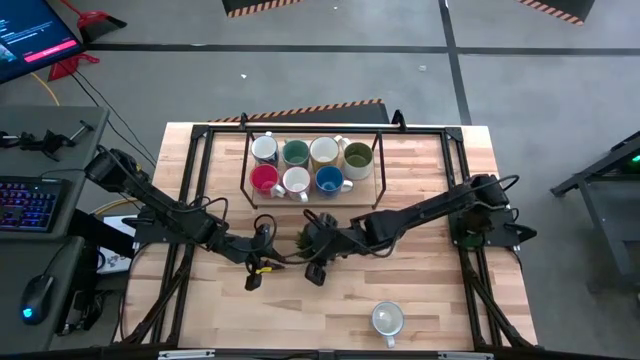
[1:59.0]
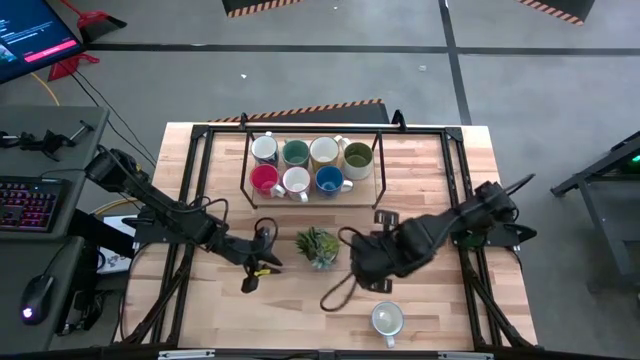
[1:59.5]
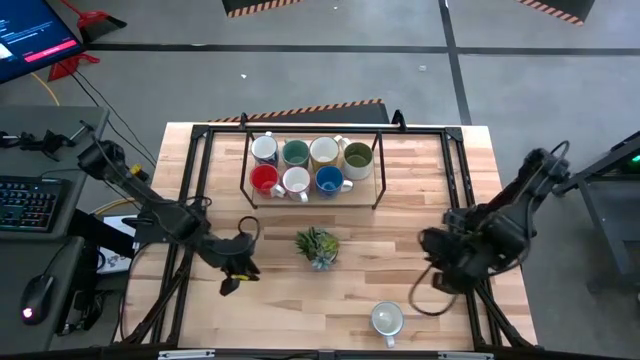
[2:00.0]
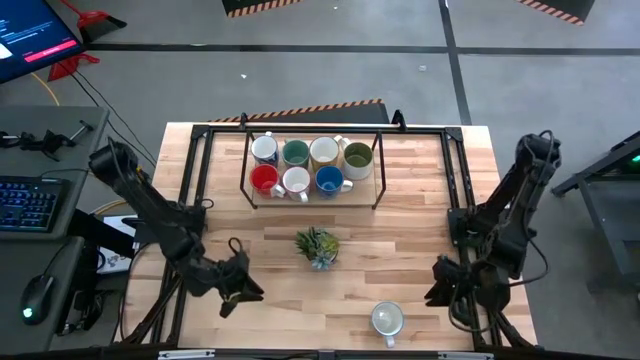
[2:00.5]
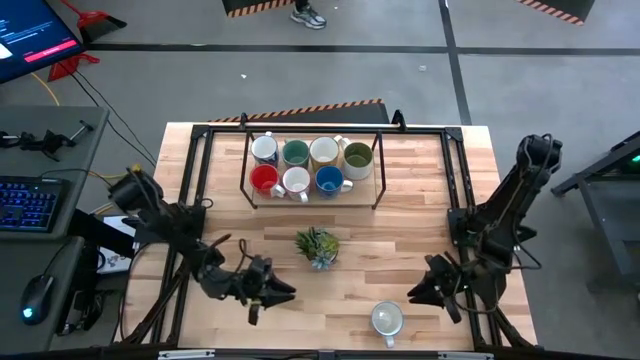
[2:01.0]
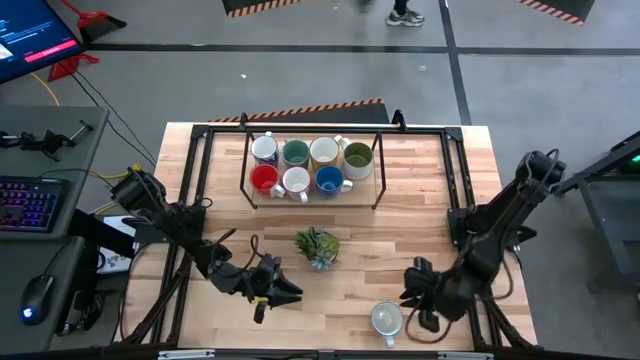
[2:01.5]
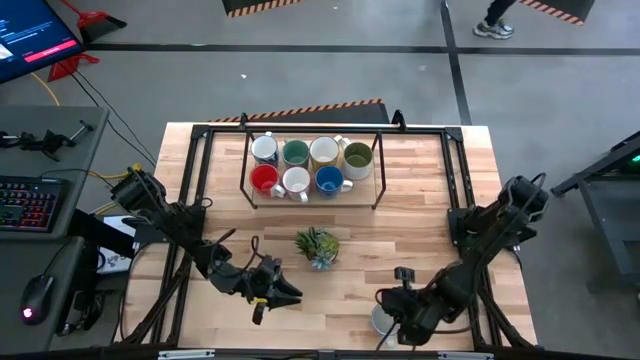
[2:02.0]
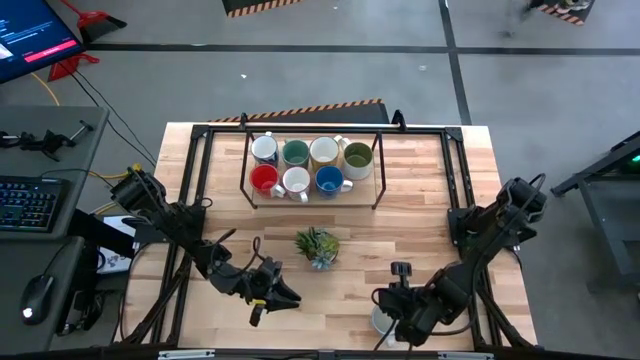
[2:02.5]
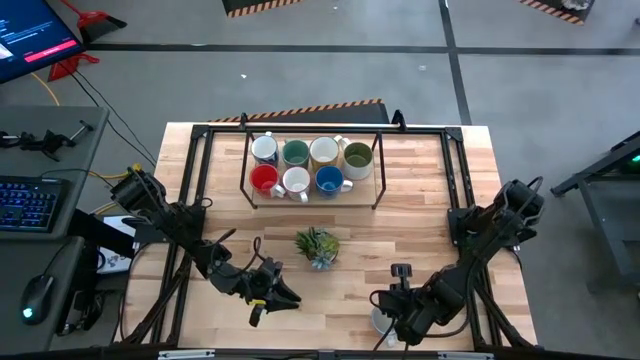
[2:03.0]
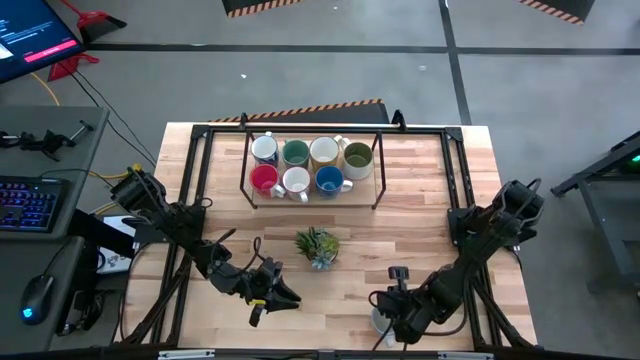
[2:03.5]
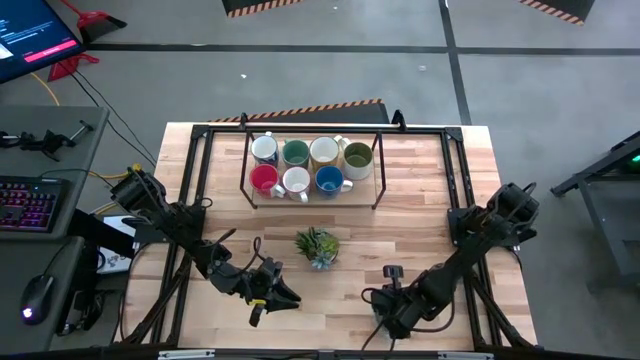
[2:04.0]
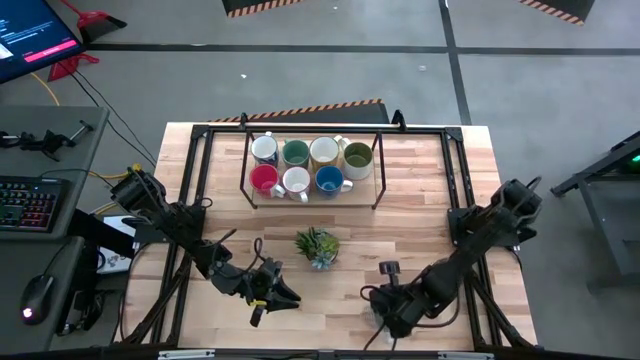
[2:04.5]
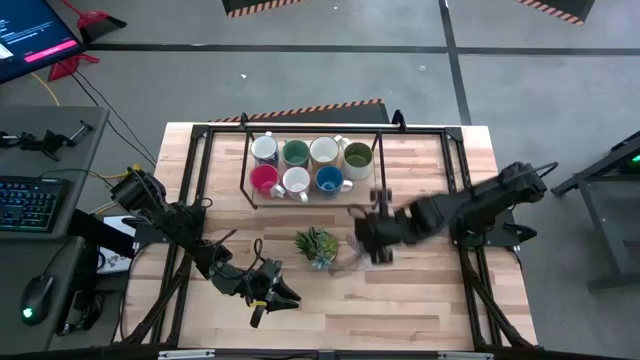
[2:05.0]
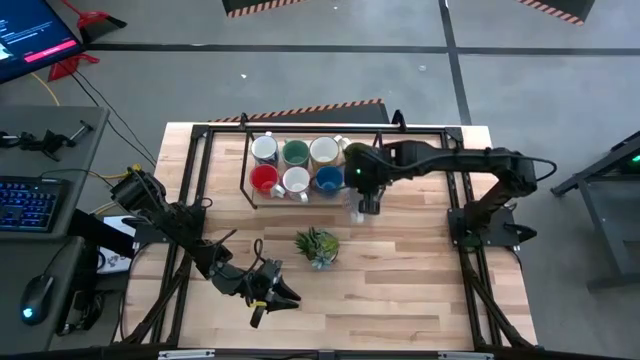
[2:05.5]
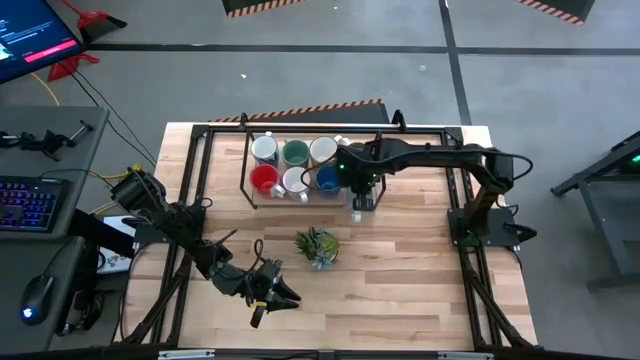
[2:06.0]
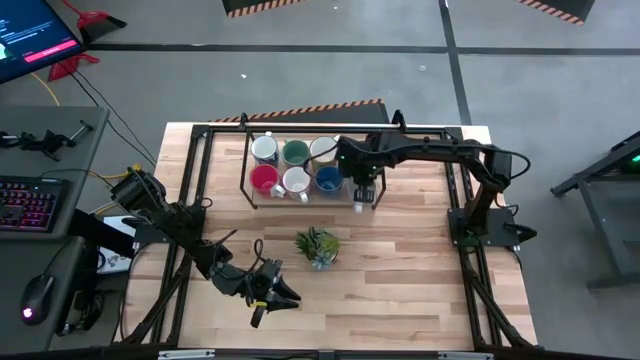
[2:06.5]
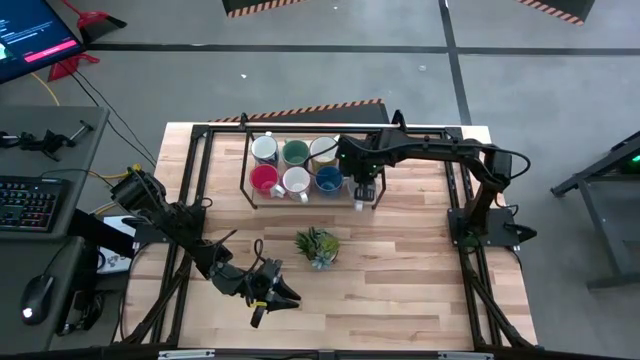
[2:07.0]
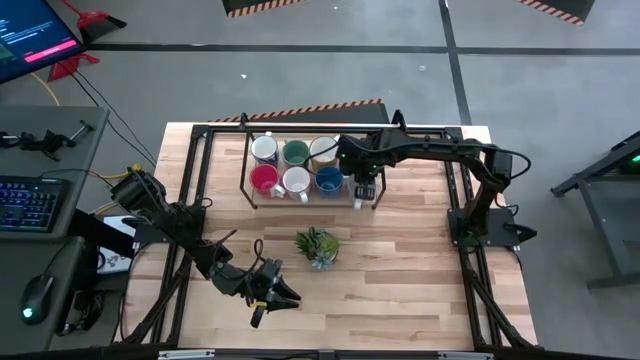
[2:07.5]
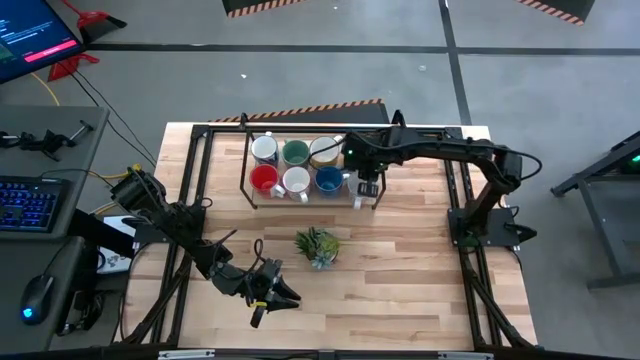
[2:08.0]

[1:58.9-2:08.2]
Task: Place coffee mugs
Put the red patterned mug on the shelf

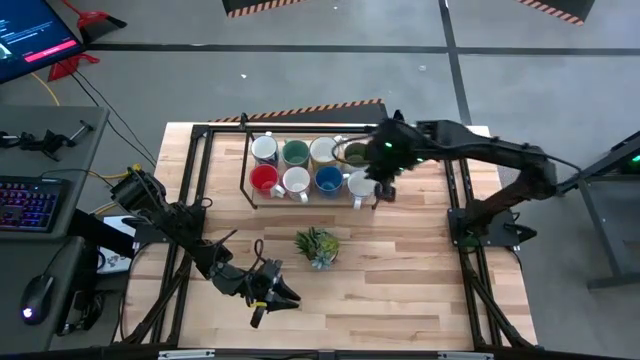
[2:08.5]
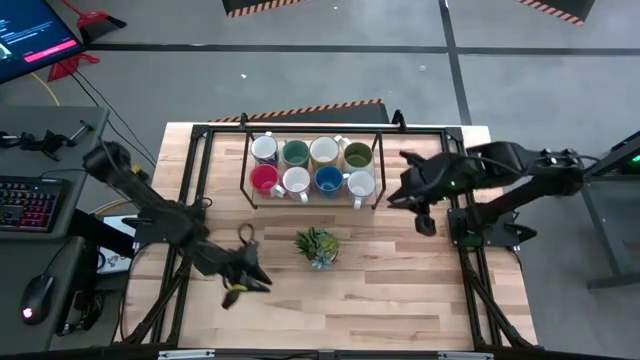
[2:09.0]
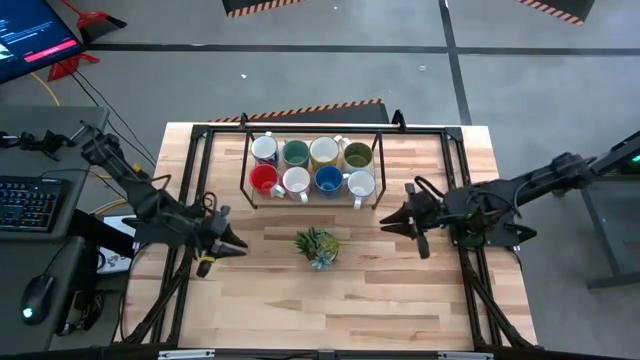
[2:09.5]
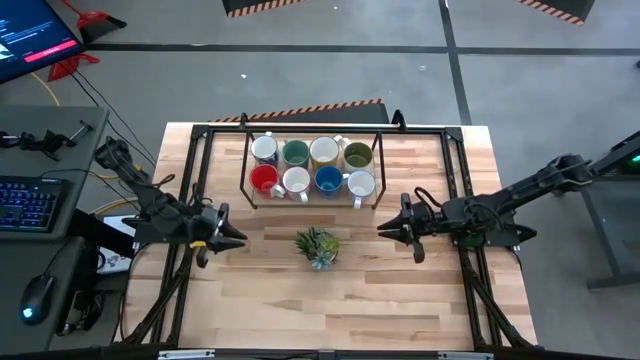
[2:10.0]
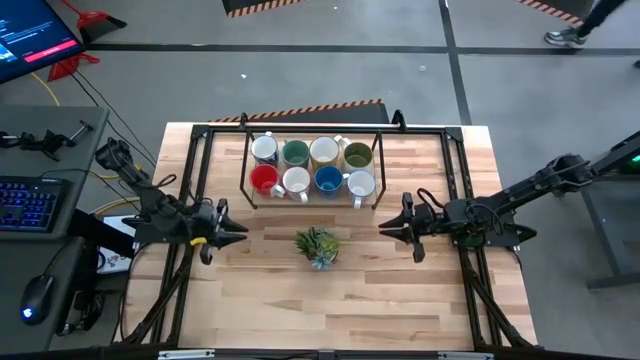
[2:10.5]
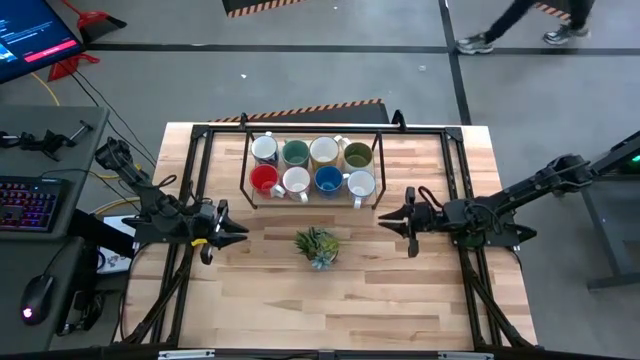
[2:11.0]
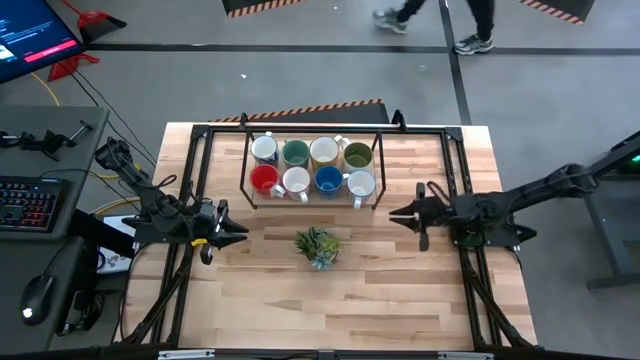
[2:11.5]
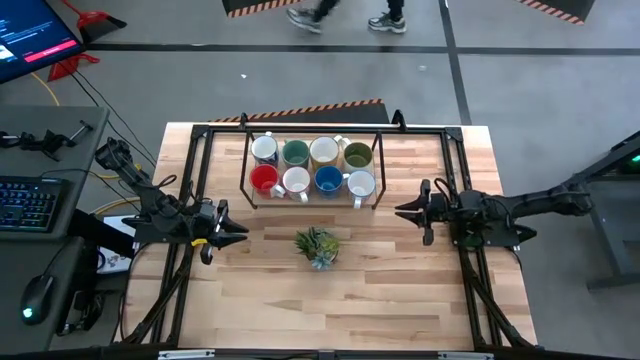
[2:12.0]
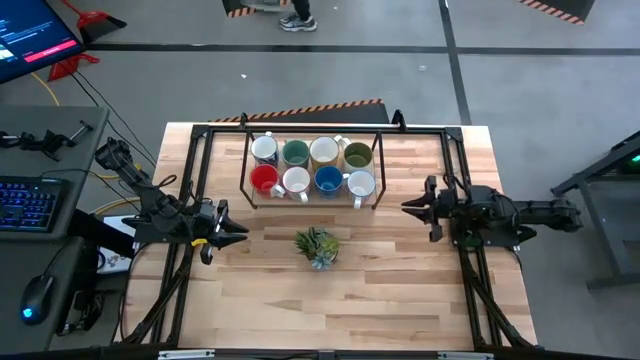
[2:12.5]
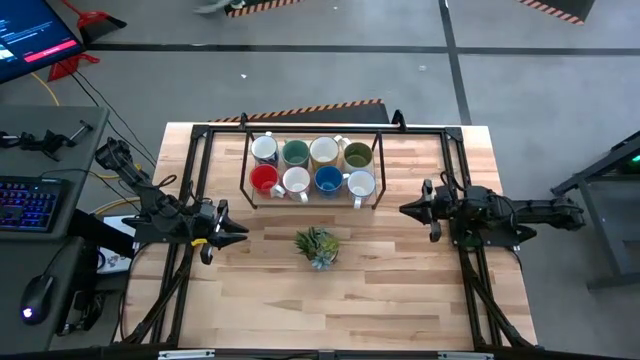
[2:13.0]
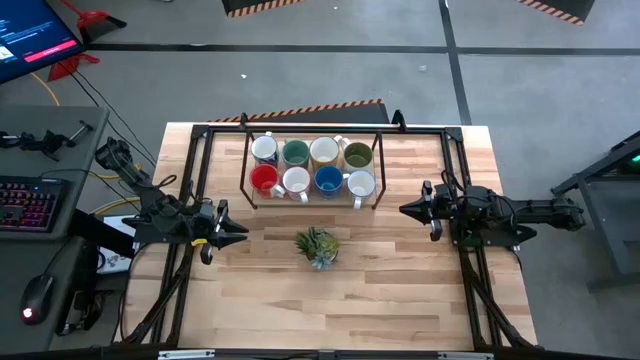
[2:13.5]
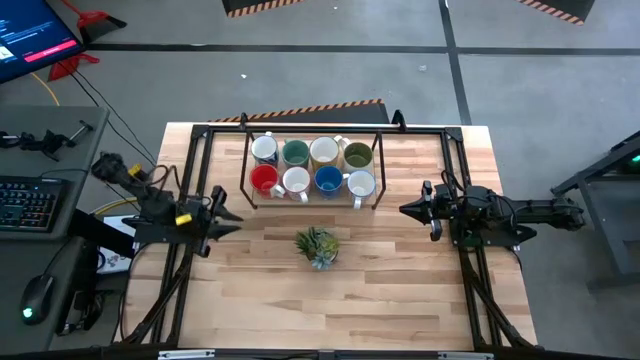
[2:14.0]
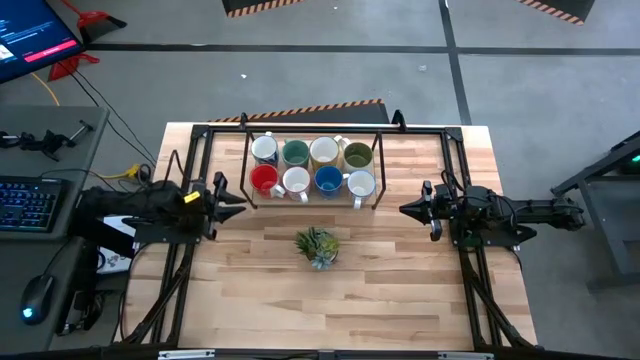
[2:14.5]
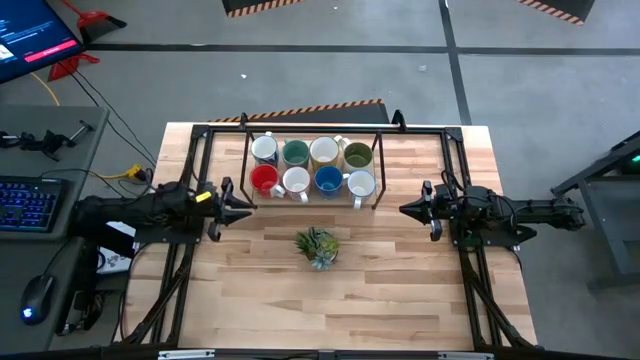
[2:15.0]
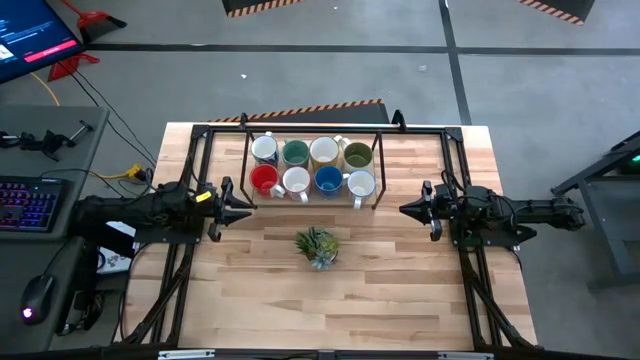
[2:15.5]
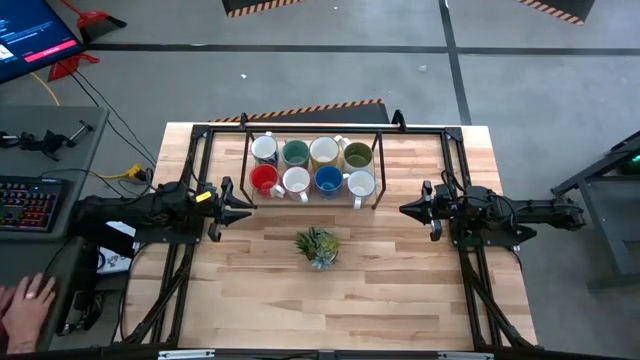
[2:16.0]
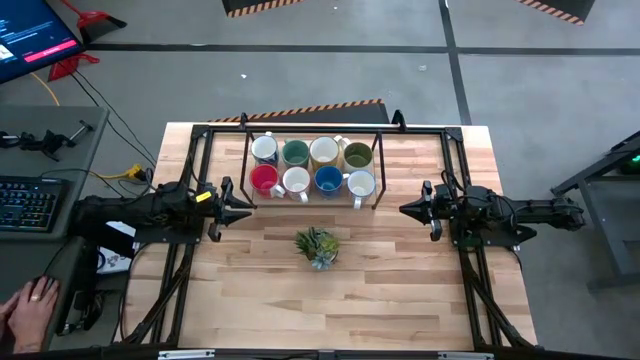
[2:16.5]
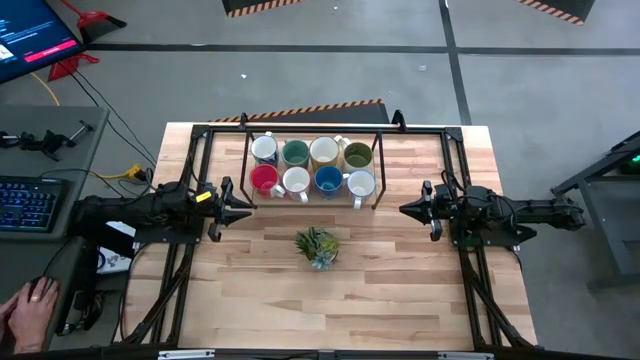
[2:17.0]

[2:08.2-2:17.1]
Return to Home Position

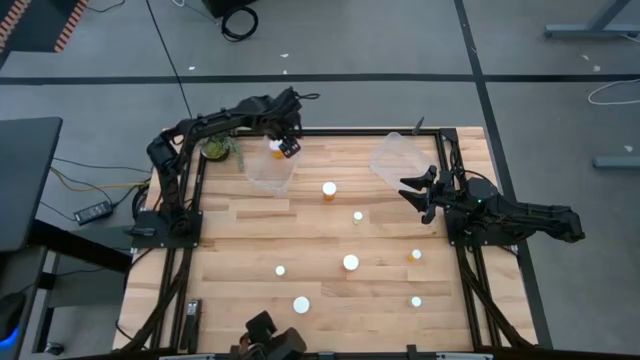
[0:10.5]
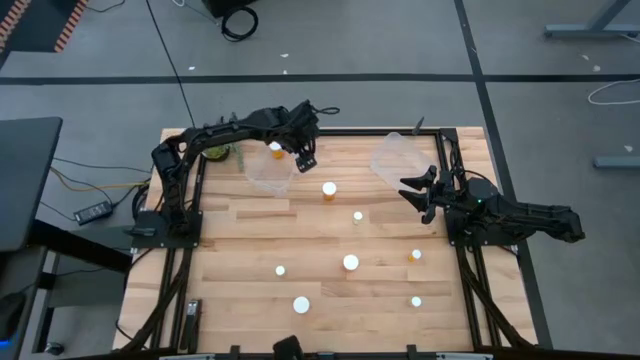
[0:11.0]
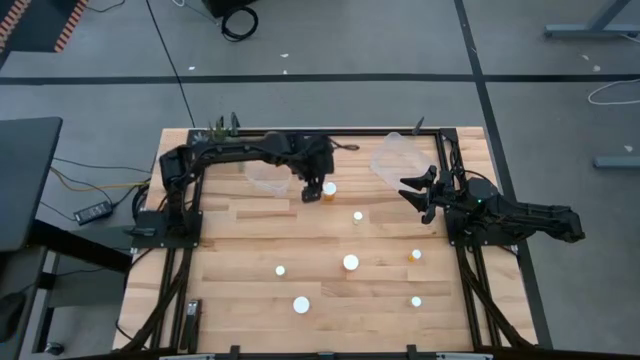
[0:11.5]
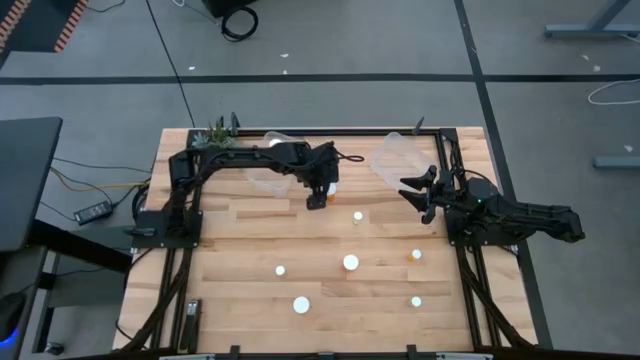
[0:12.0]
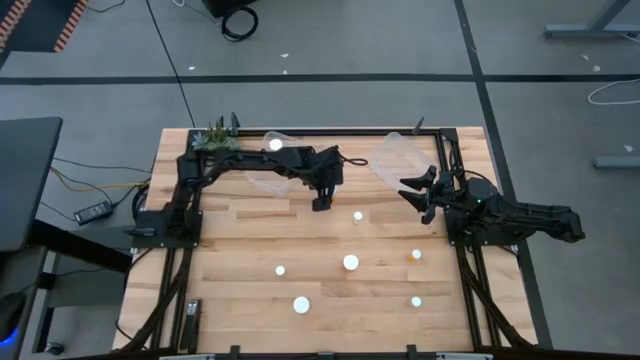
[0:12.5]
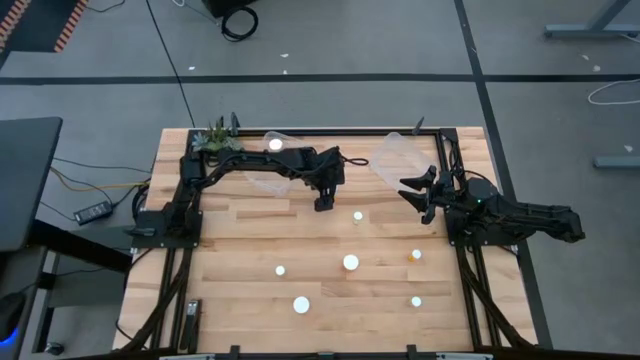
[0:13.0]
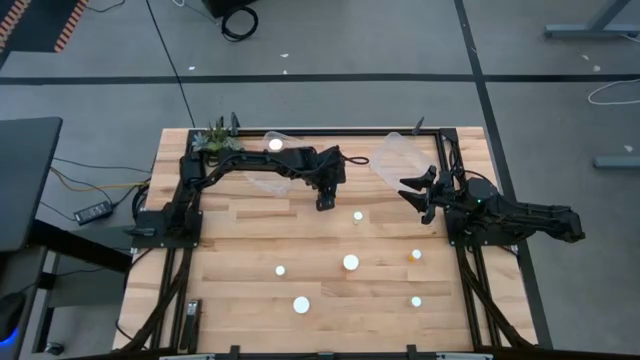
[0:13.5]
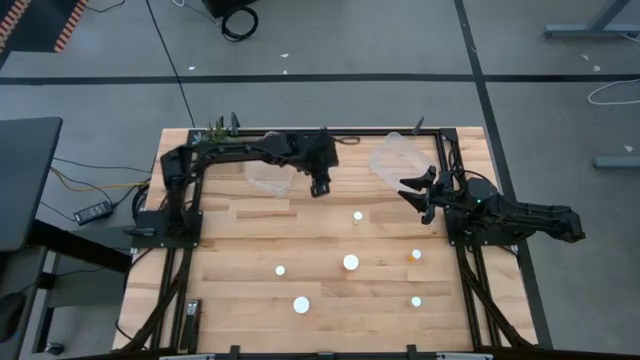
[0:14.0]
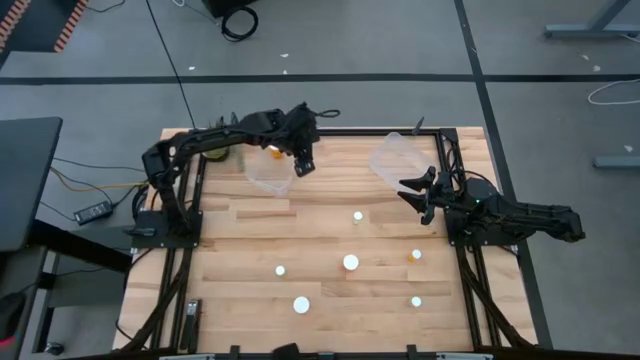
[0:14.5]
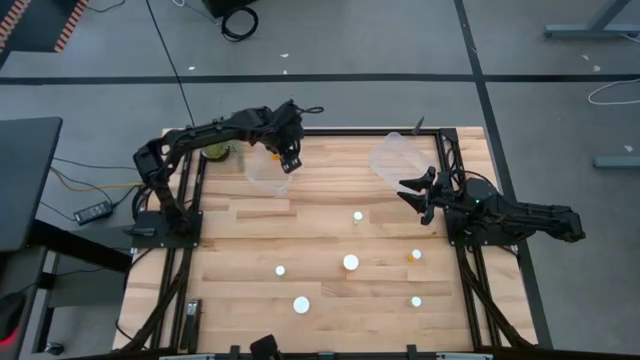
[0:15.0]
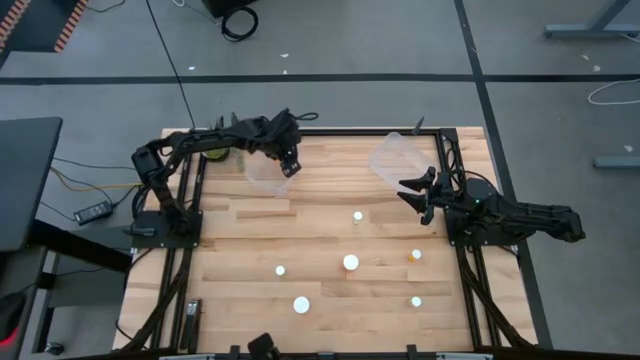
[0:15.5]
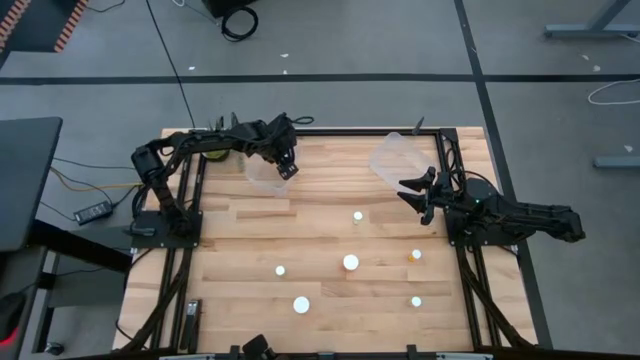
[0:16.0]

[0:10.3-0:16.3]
Task: Pick and place medicine bottles into bin by pill shape (circle, oval)
Put the large orange pill bottle into the left transparent bin
